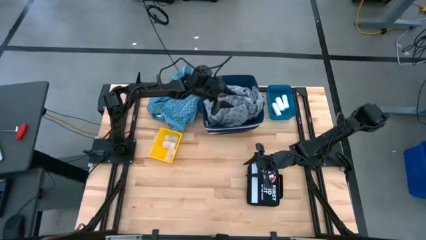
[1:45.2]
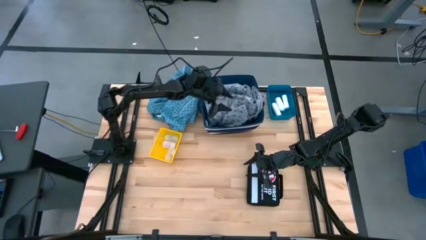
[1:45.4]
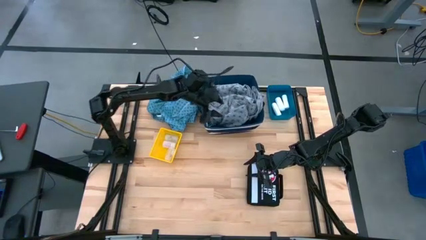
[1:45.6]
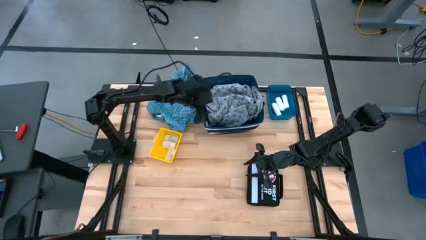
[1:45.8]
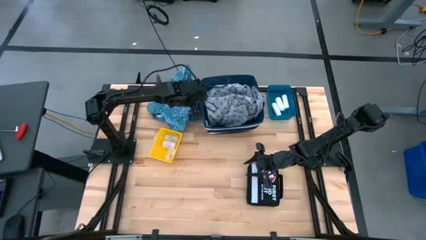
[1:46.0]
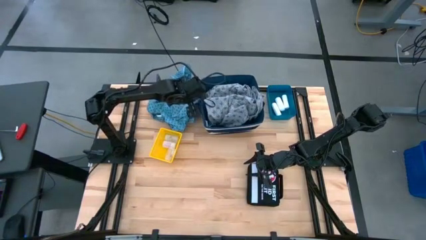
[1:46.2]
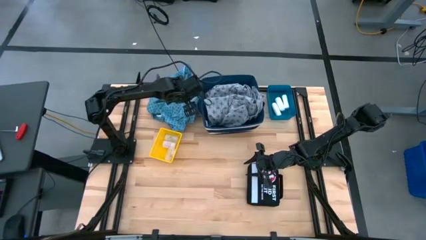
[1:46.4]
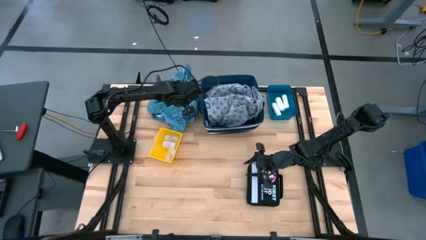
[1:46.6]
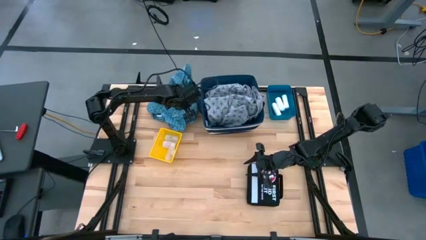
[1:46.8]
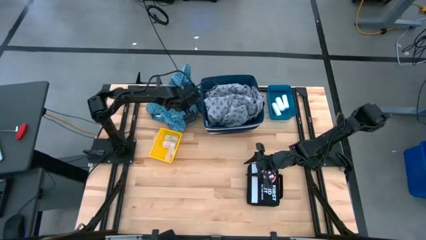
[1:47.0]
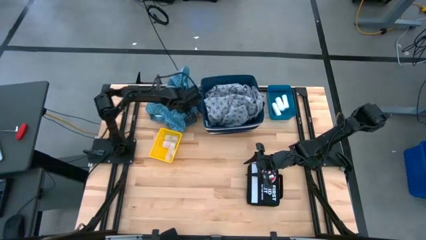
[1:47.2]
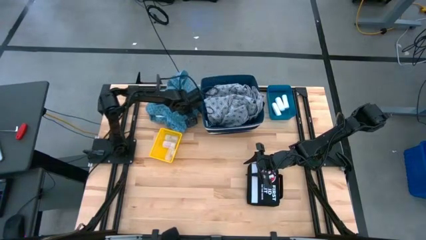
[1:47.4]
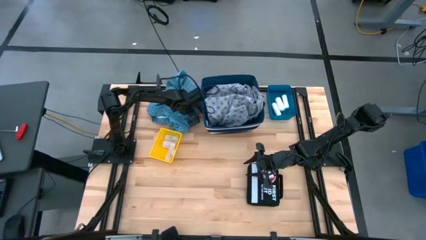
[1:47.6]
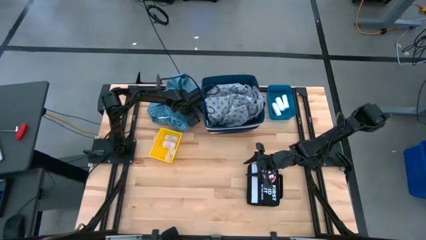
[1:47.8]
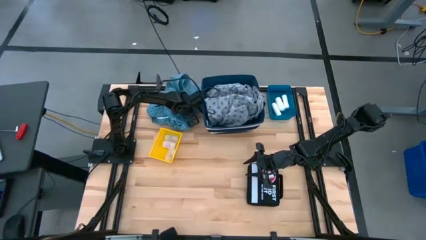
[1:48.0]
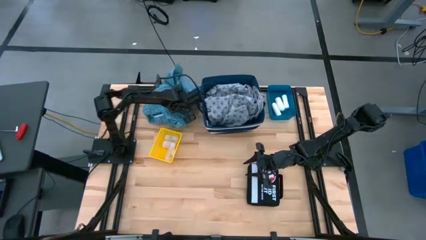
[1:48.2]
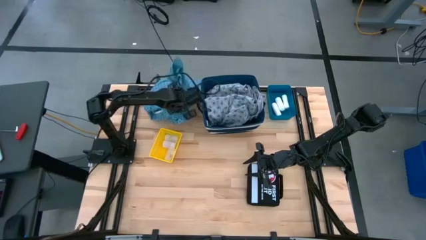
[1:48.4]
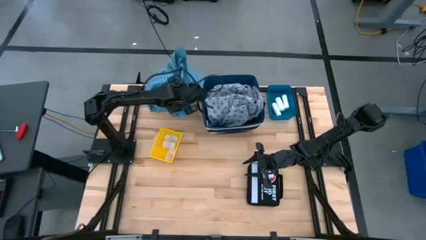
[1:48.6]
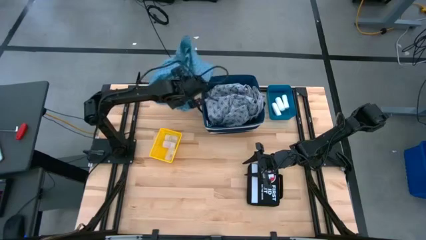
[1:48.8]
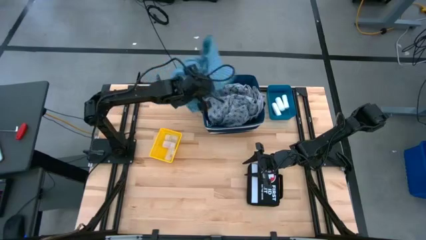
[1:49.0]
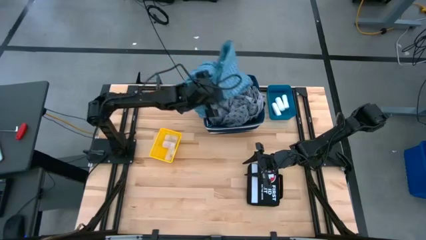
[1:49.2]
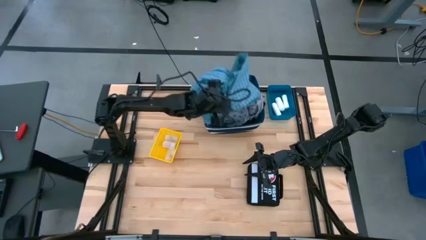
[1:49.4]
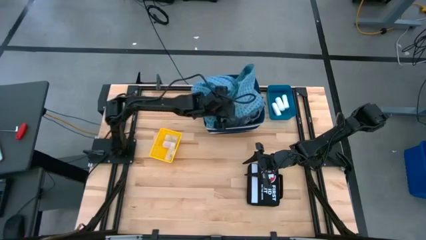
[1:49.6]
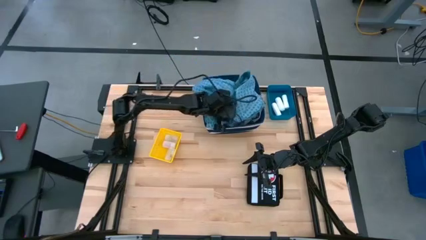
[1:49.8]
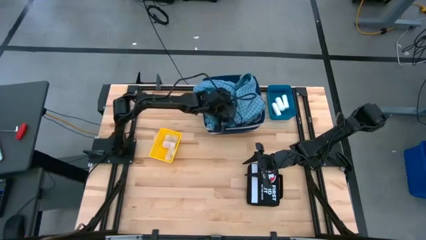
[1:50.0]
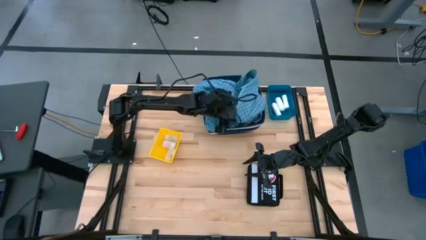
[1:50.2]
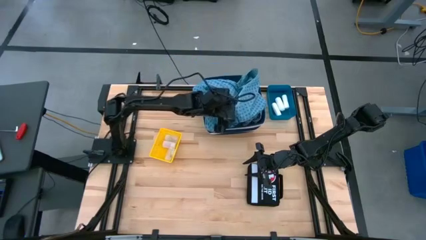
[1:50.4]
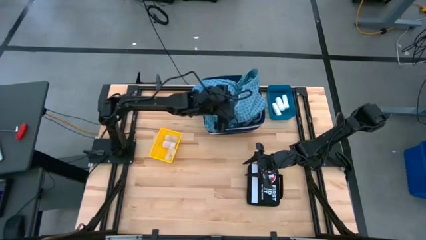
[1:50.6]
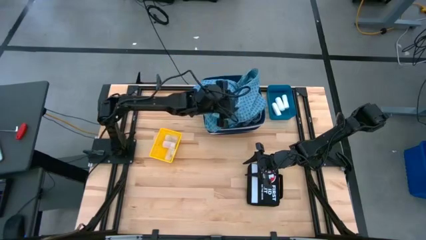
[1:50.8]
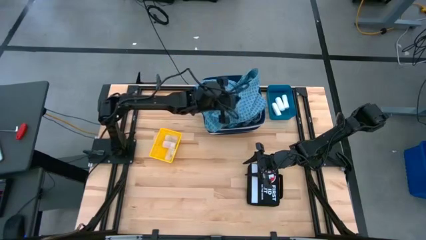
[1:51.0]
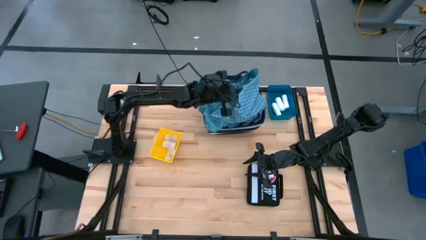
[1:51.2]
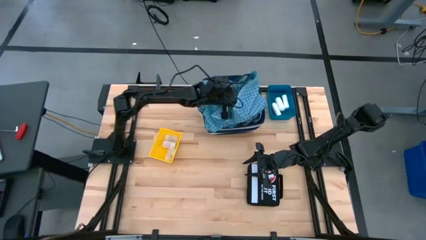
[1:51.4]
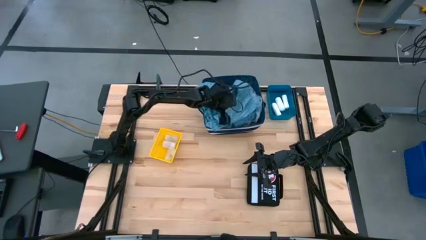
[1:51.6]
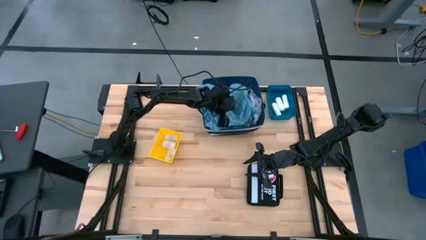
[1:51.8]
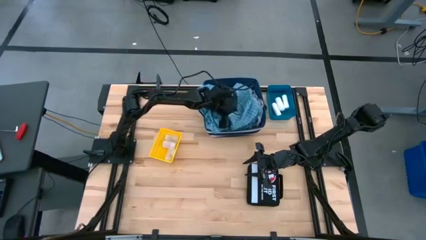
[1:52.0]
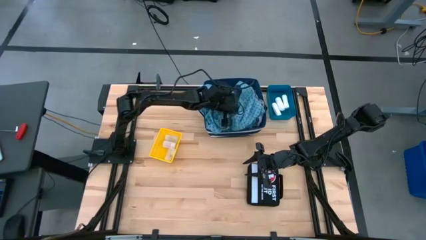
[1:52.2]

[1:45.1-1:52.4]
Task: Pick & place medical supplies in basket/bin
Put the blue patient gown into the blue laundry organizer

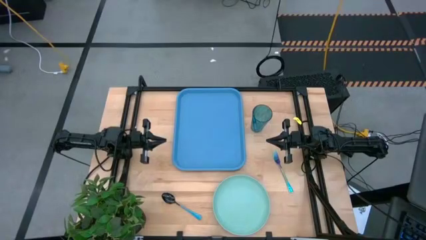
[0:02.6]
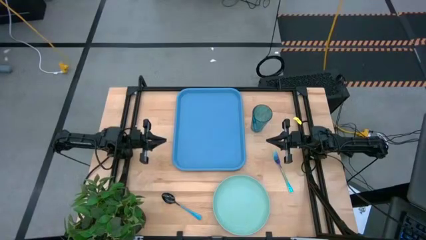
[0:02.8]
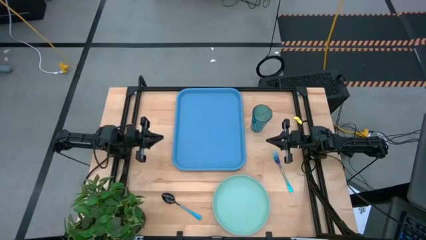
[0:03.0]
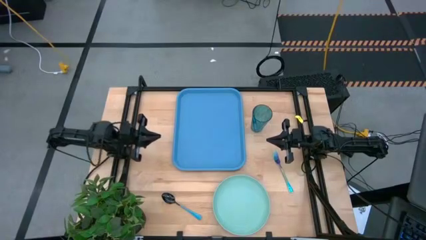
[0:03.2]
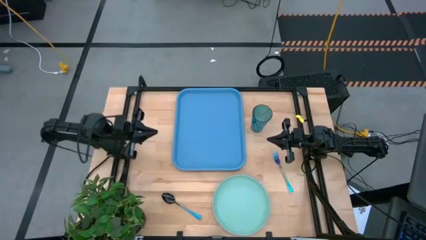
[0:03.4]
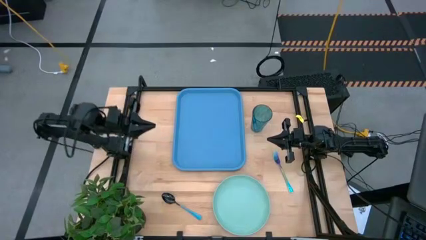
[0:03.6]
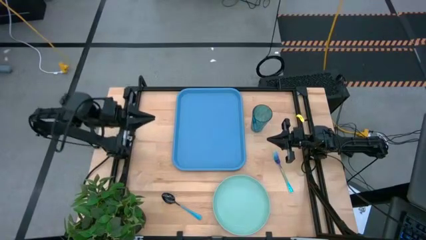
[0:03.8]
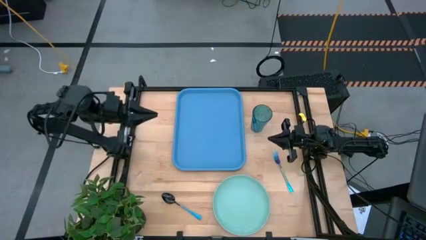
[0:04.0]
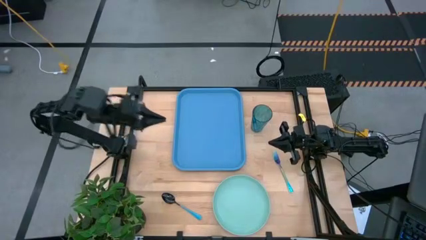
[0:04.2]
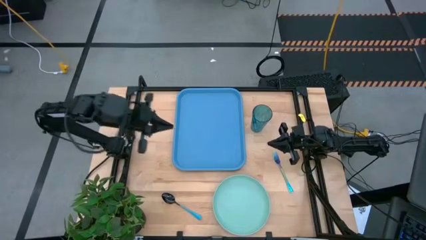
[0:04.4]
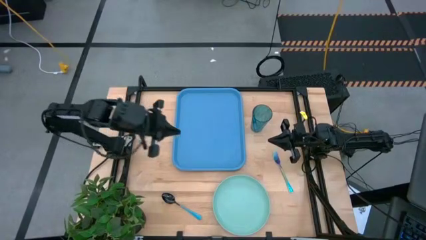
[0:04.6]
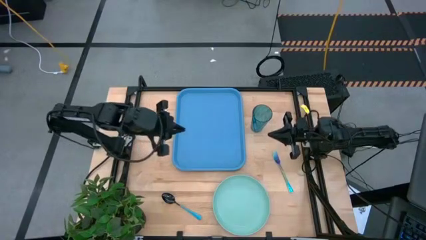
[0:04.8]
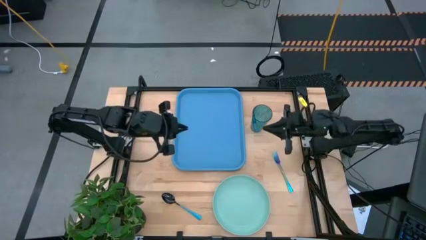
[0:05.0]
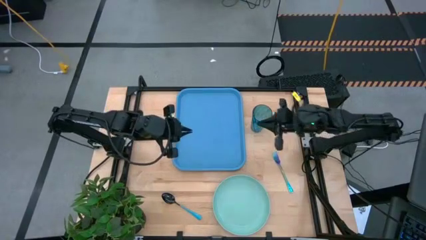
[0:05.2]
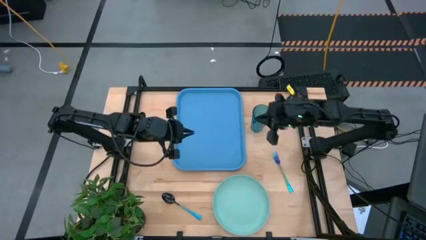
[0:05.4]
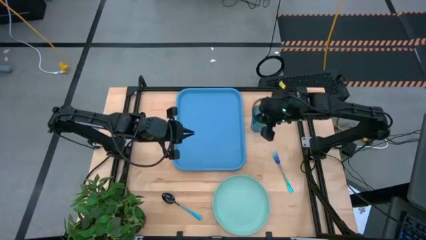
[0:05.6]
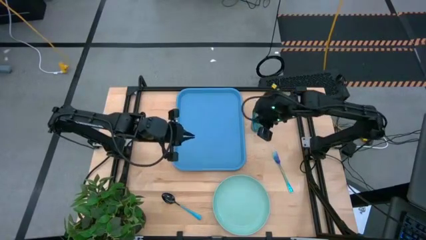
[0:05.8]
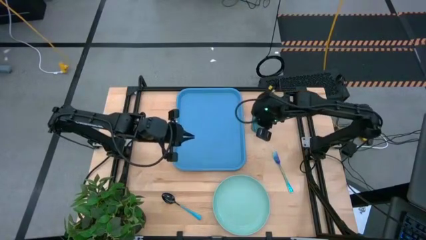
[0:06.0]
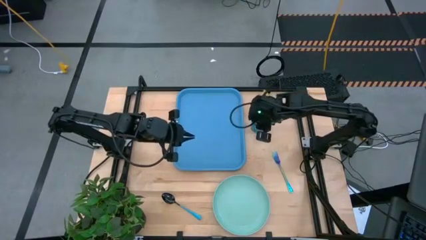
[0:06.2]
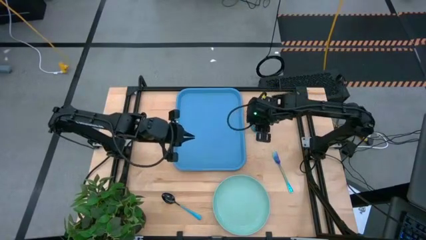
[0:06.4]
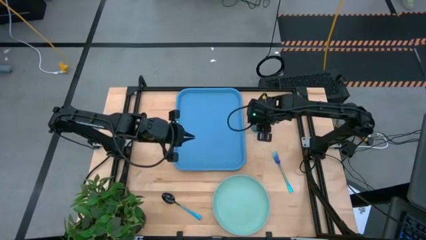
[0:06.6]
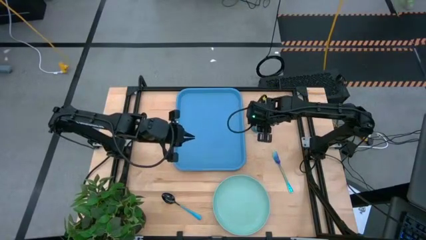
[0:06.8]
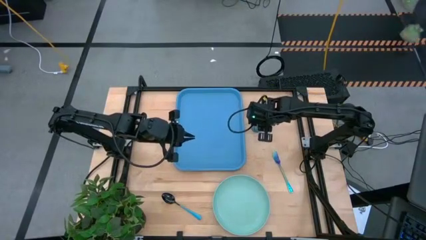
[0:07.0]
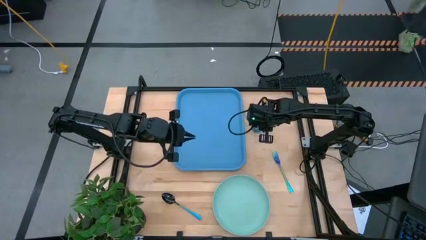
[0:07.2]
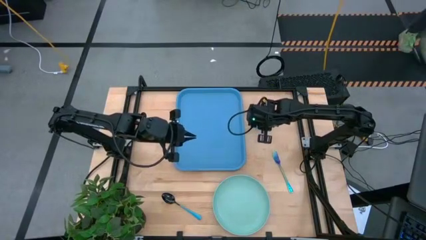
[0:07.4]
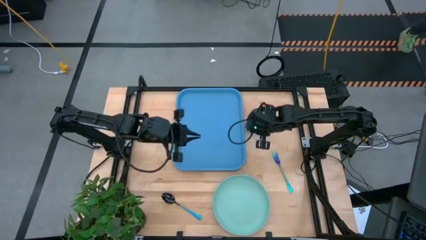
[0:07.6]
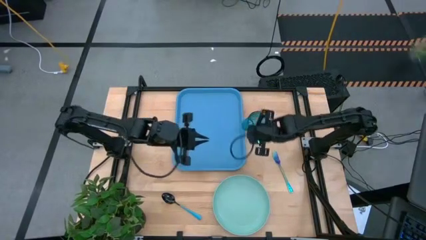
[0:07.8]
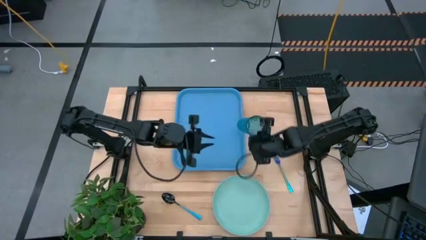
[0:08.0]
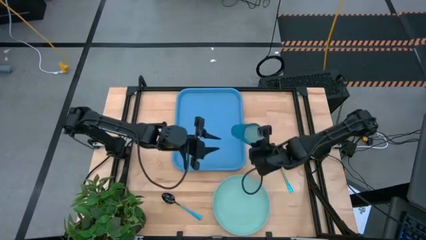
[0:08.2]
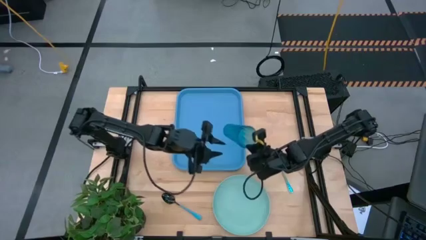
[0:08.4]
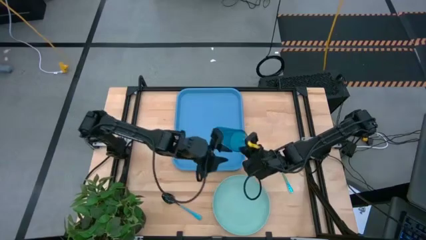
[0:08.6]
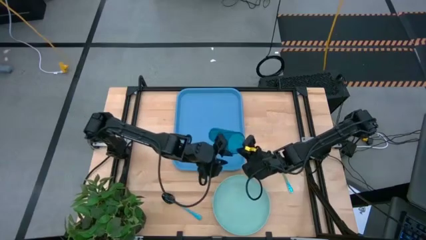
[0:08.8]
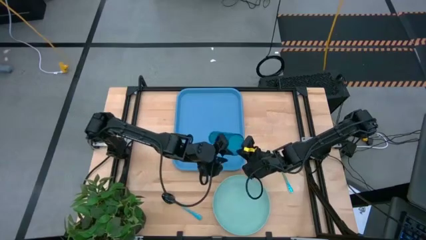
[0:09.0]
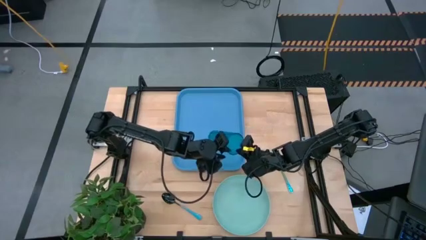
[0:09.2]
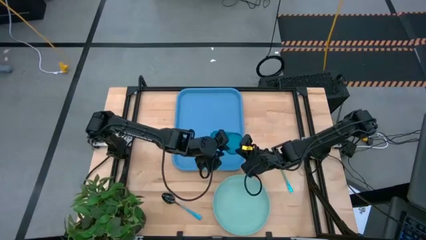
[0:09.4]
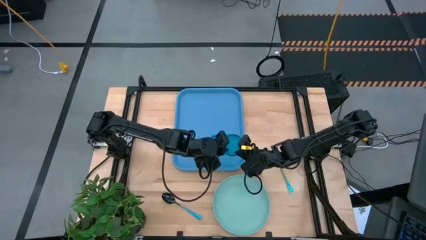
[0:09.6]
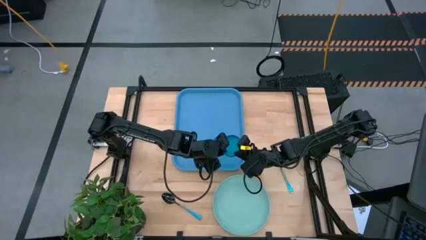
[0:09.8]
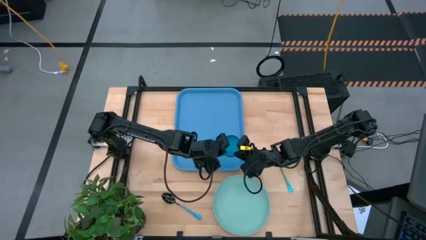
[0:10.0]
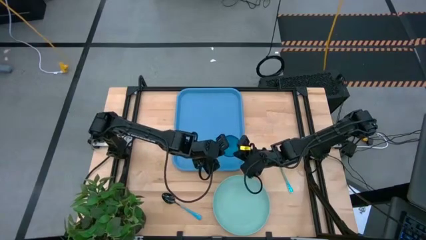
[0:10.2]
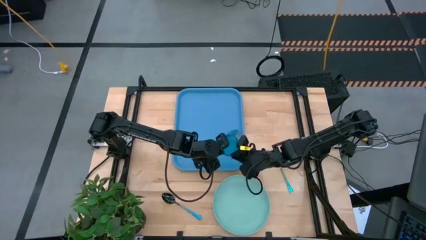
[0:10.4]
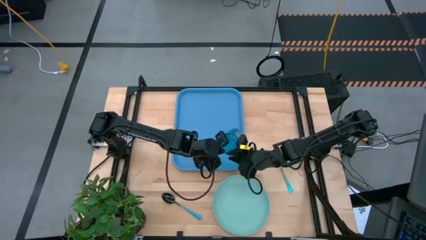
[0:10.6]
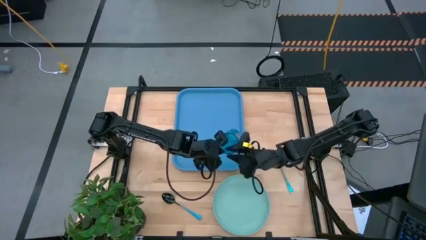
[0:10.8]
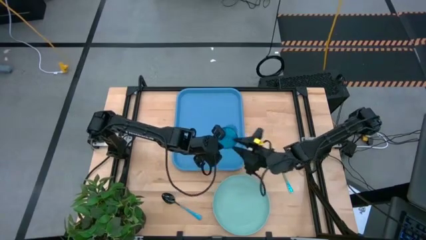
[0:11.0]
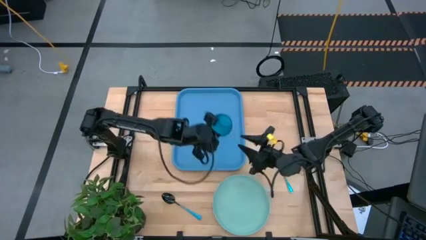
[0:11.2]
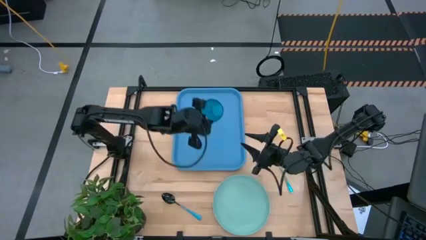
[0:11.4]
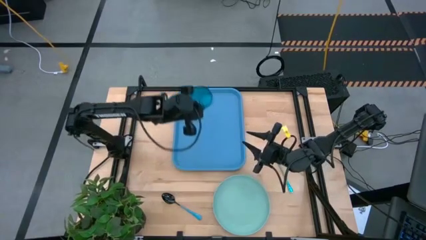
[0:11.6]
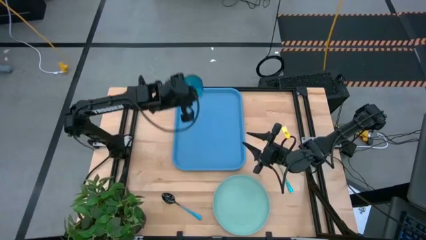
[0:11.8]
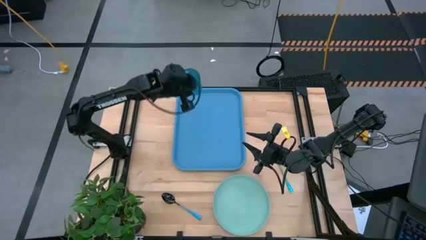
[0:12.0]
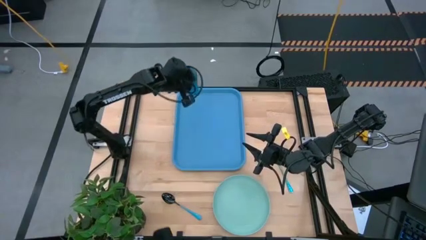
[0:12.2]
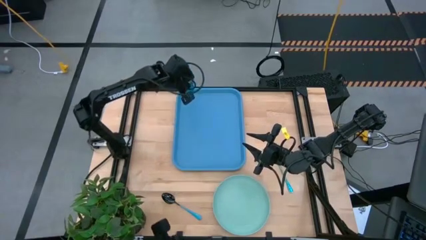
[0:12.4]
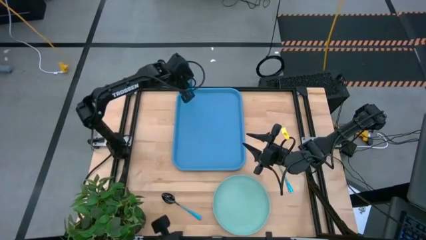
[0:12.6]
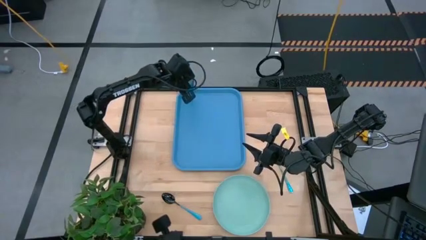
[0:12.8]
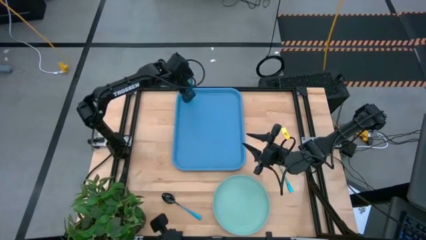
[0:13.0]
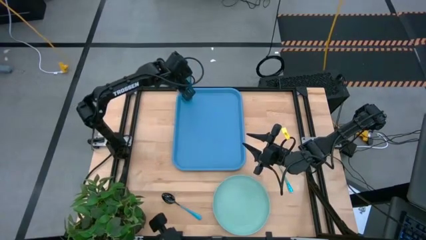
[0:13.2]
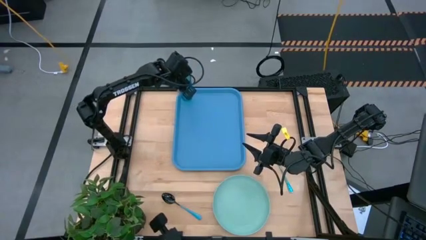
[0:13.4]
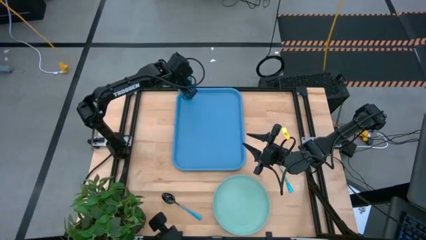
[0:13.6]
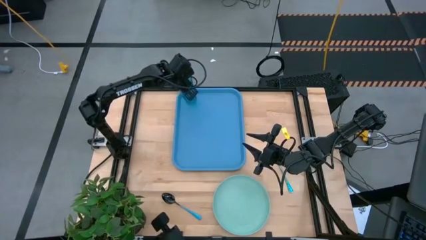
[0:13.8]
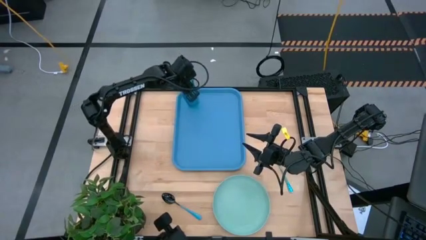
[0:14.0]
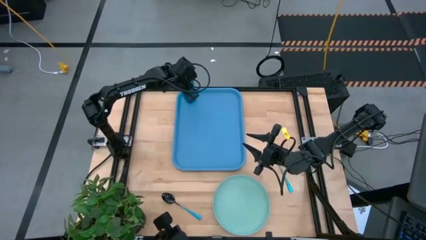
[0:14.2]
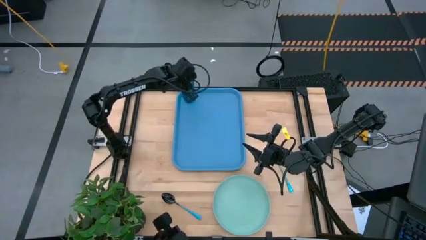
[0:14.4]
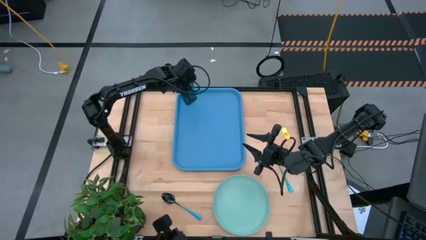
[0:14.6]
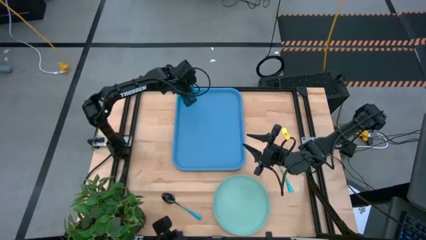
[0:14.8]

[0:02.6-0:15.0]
Task: Pick and place plate/cup/fork/spoon on tray
Put the blue cup on the blue serving tray
